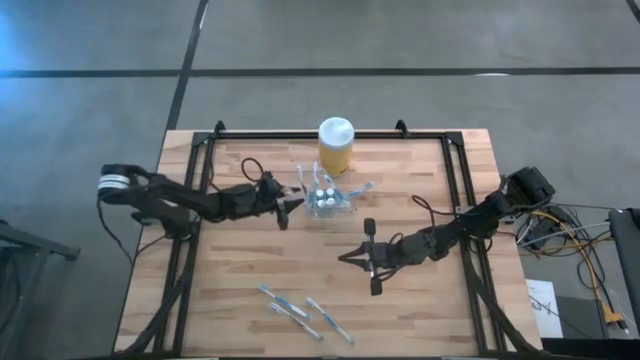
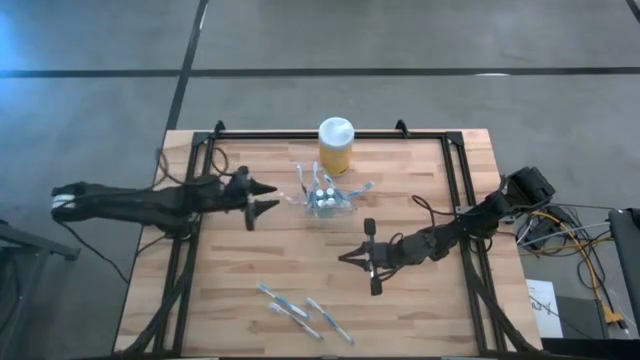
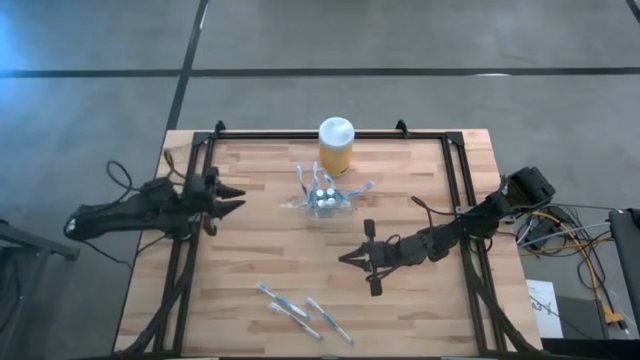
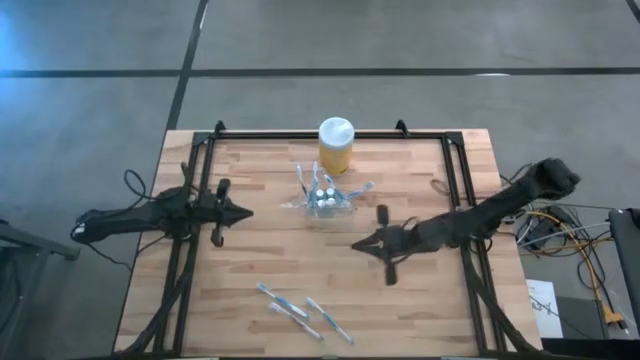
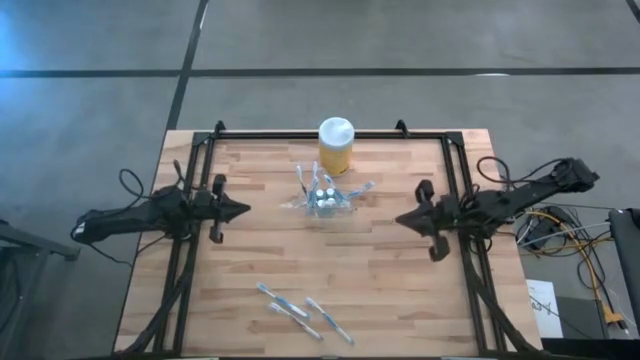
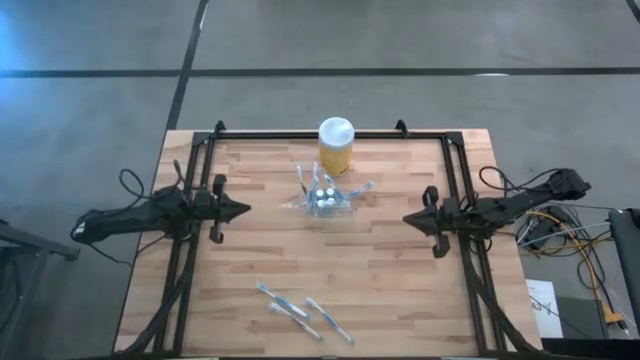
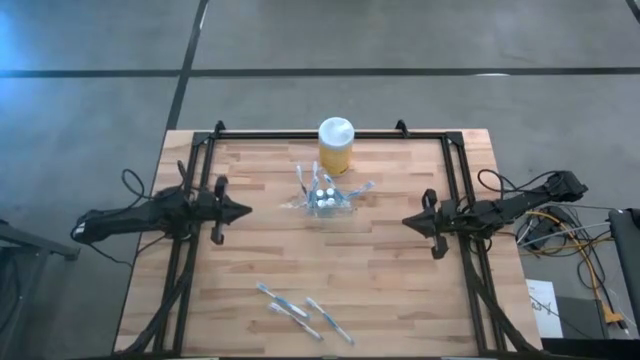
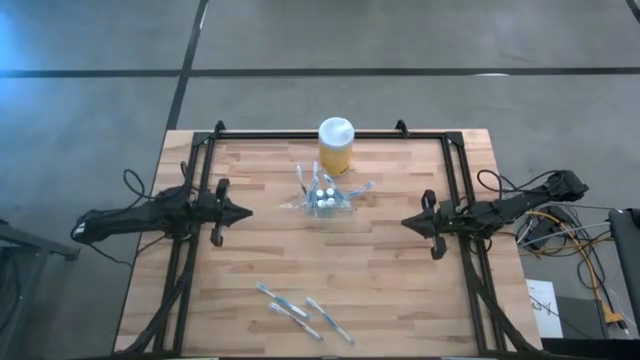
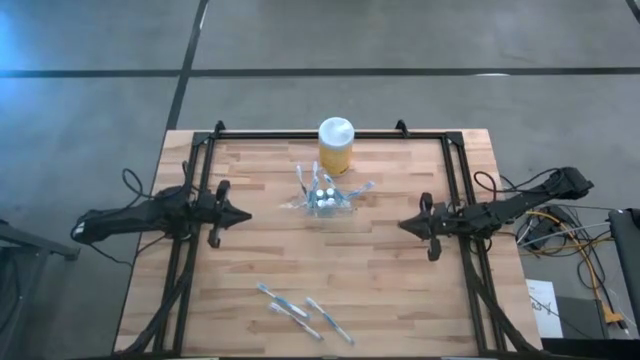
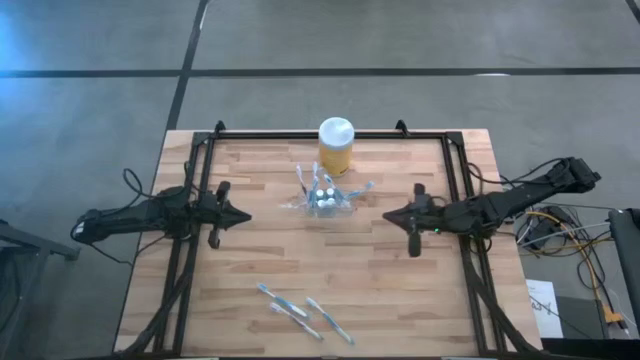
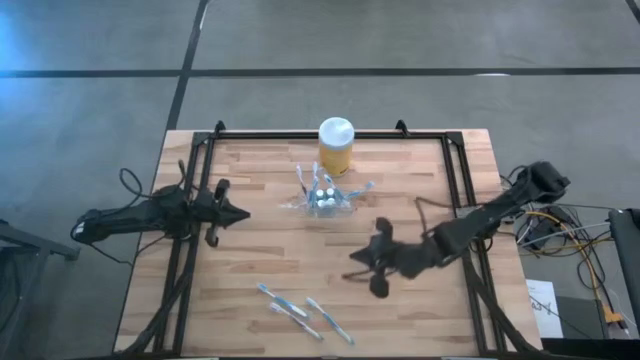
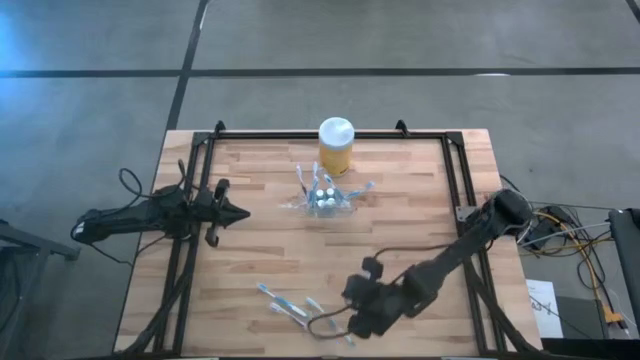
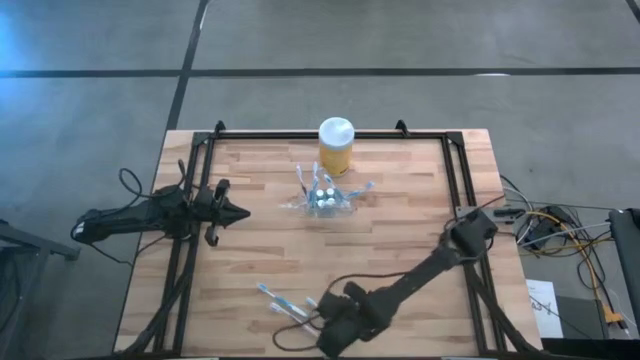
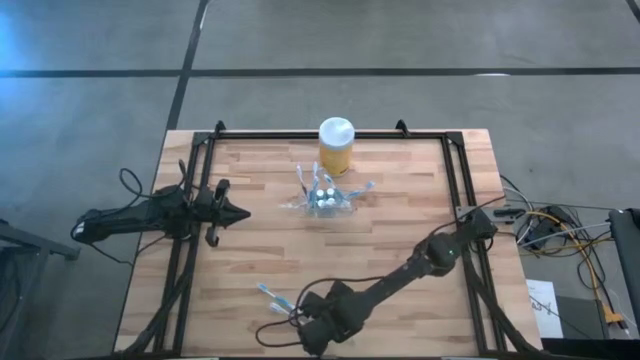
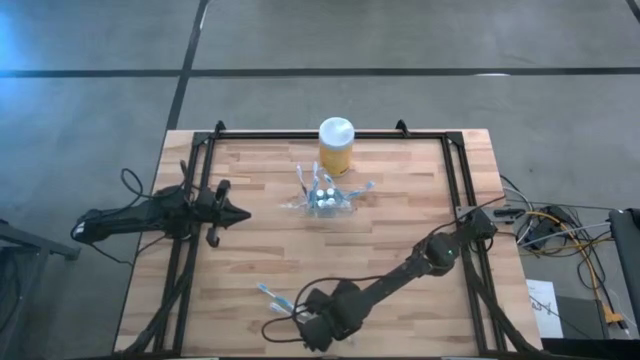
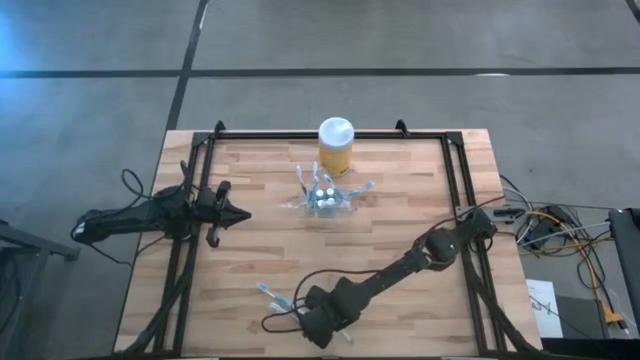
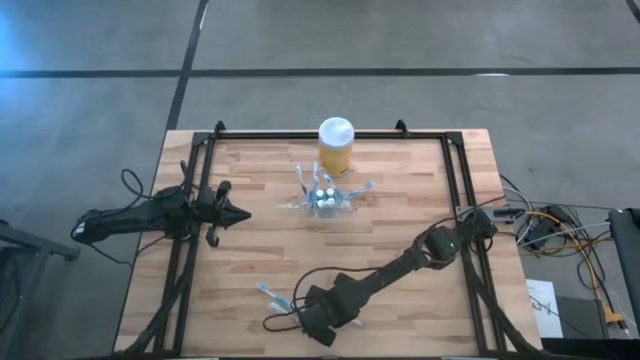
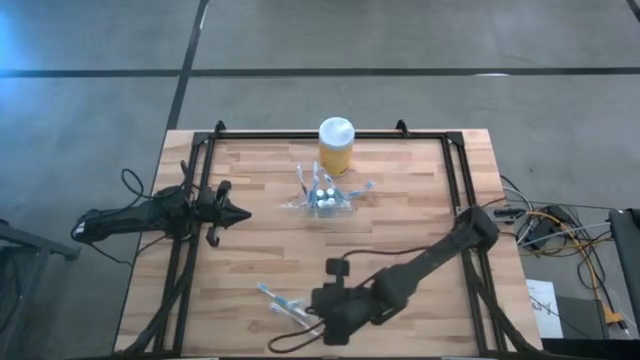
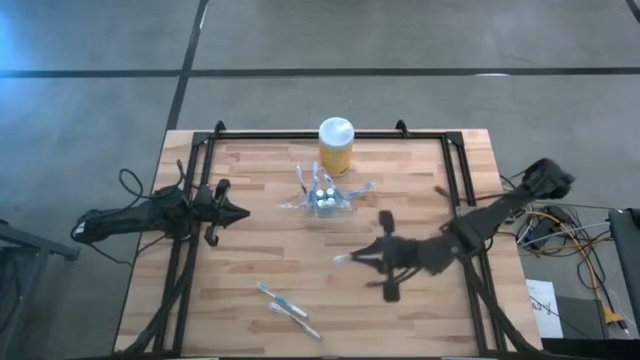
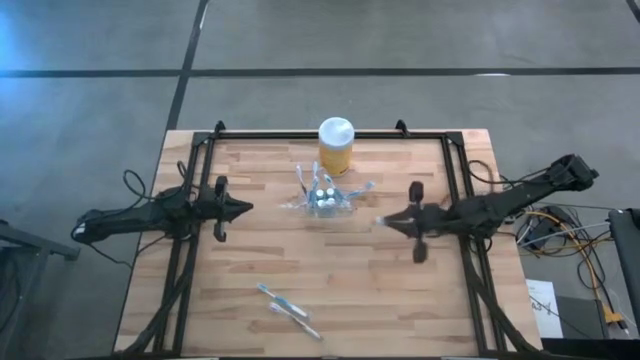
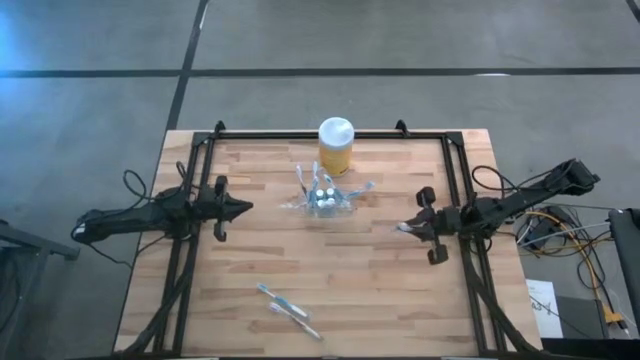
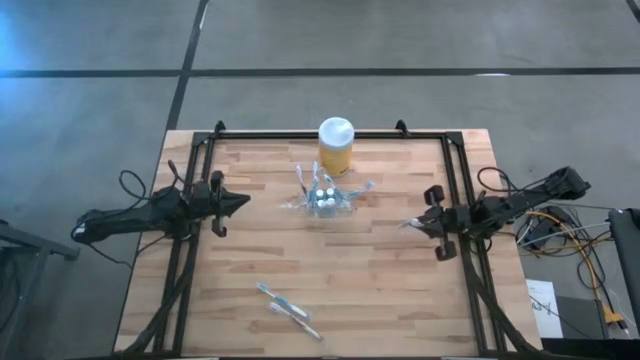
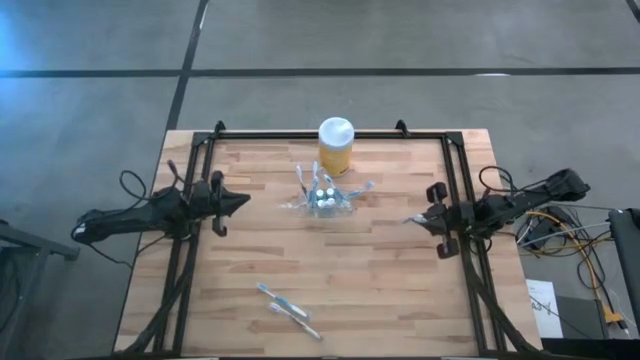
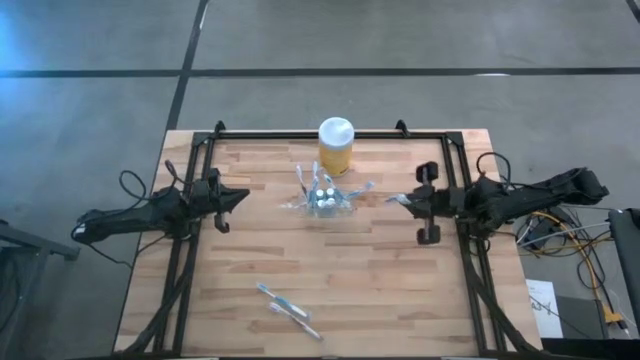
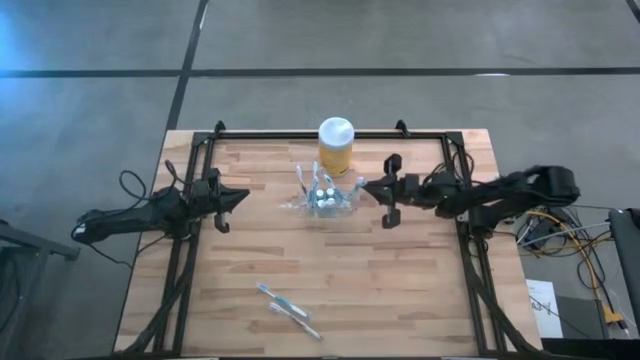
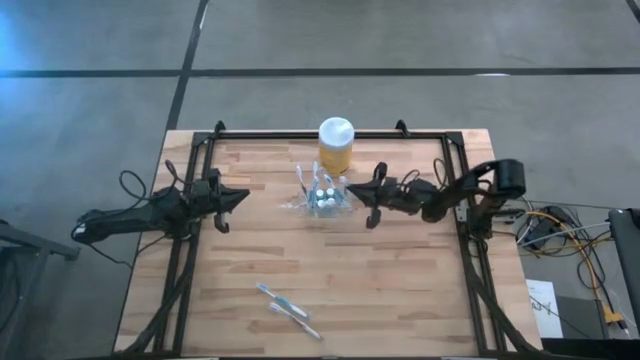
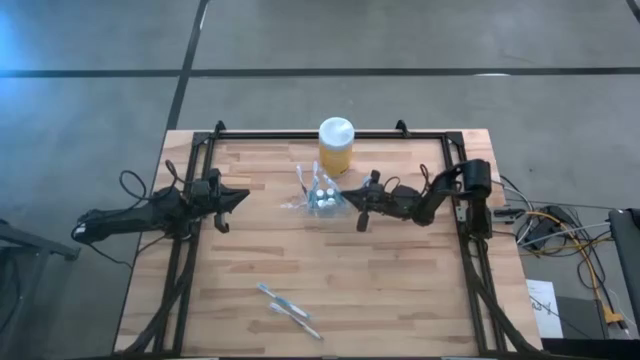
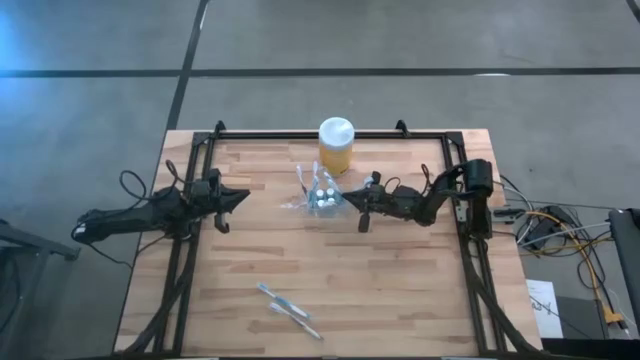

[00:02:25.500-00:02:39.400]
Task: Pick & Place toothbrushing station
Put the blue toothbrush into the transparent organizer

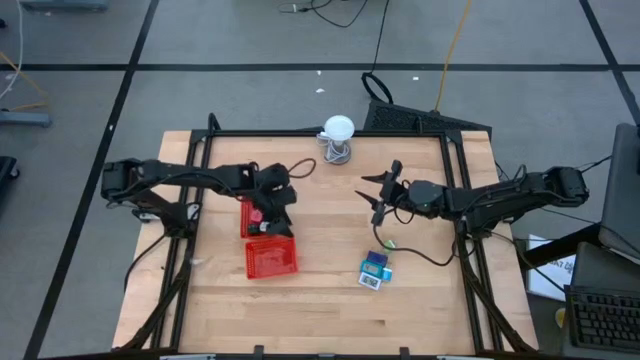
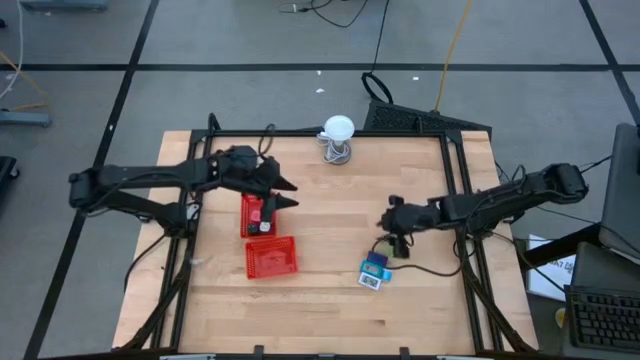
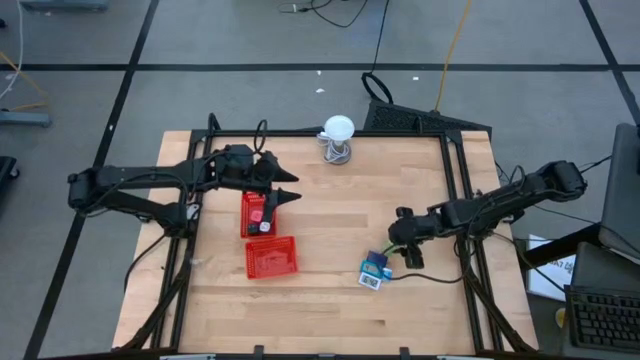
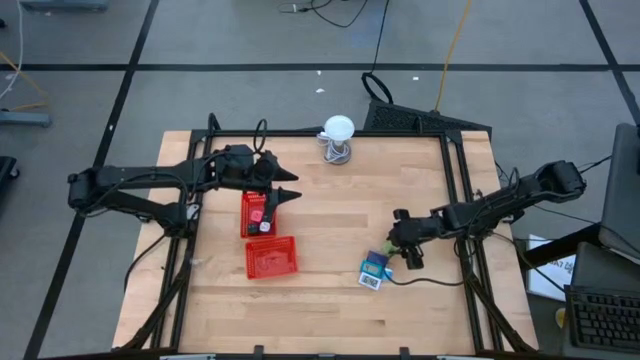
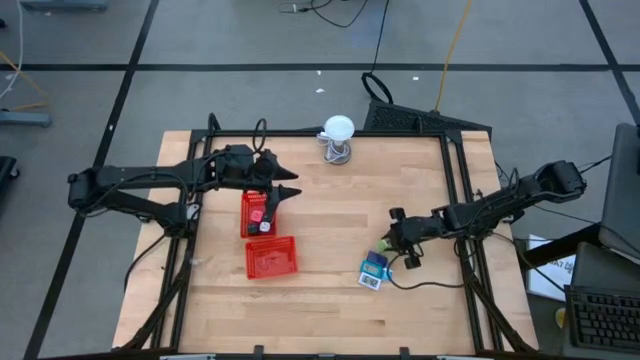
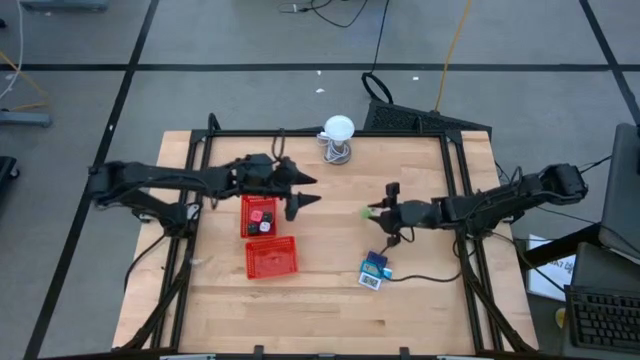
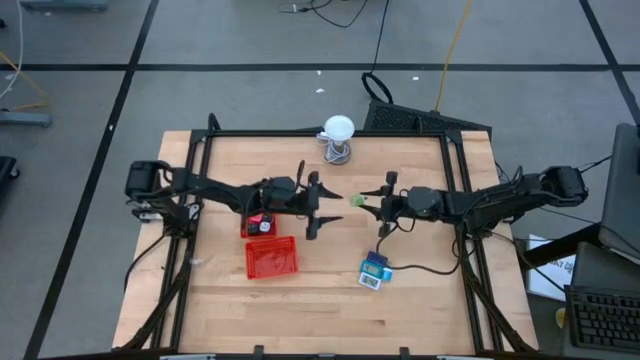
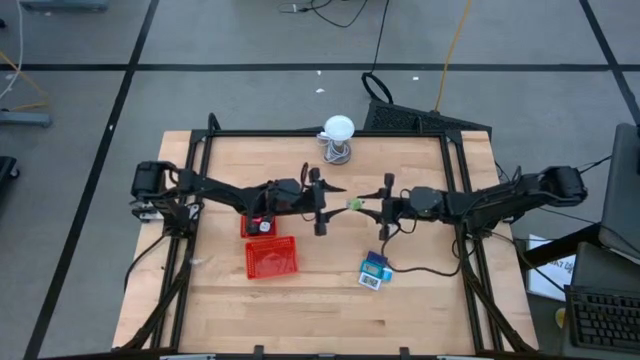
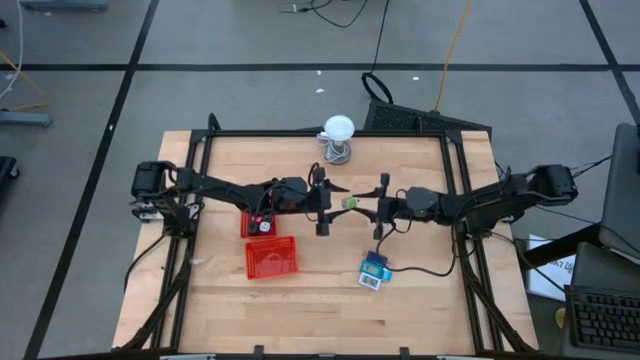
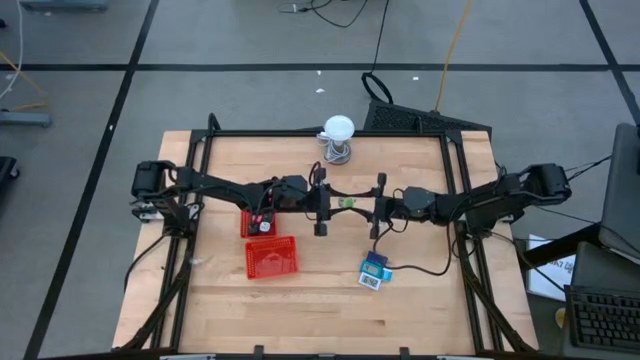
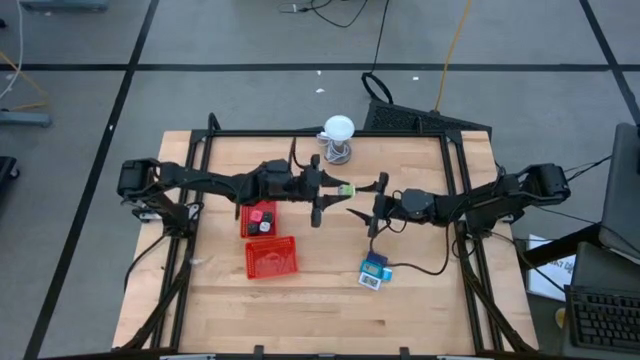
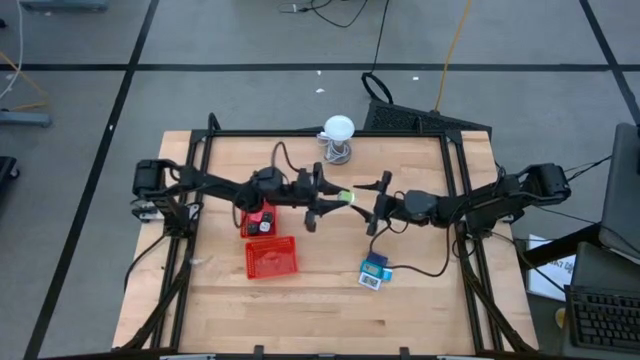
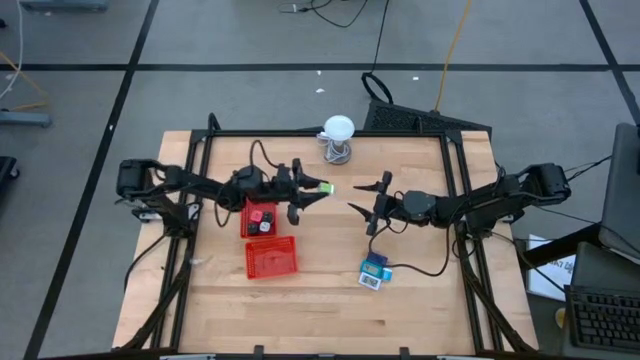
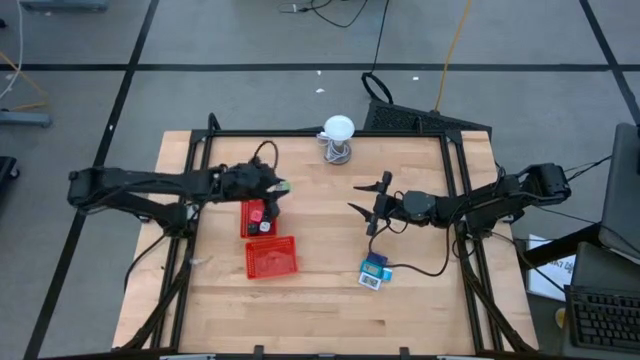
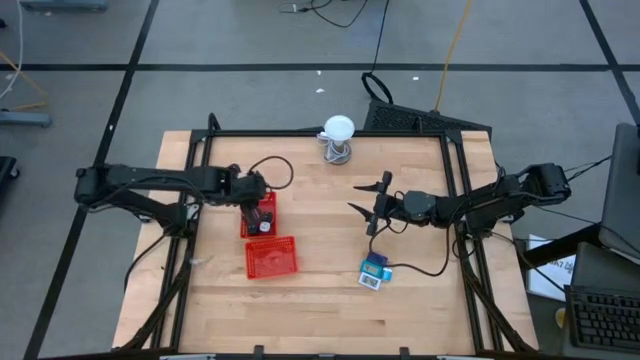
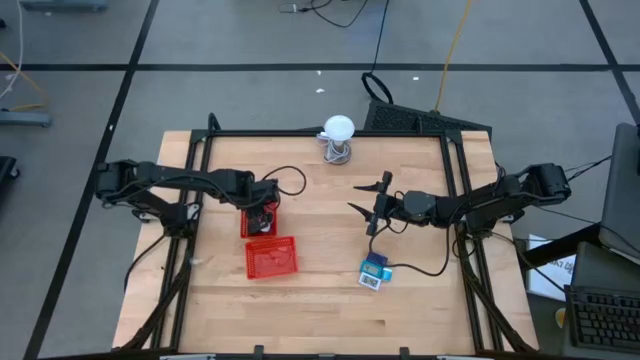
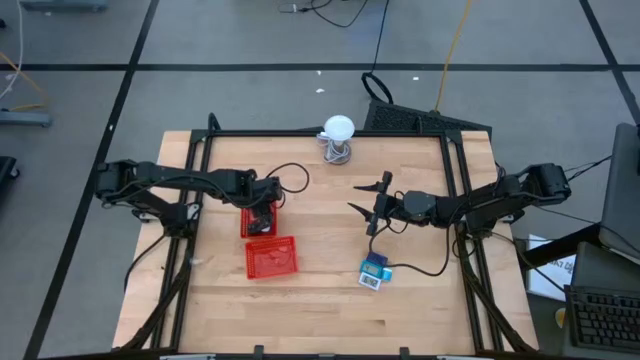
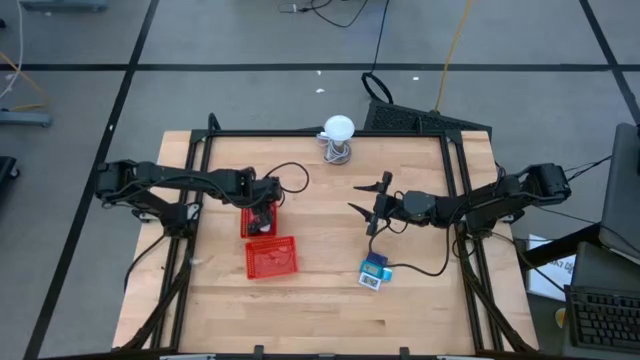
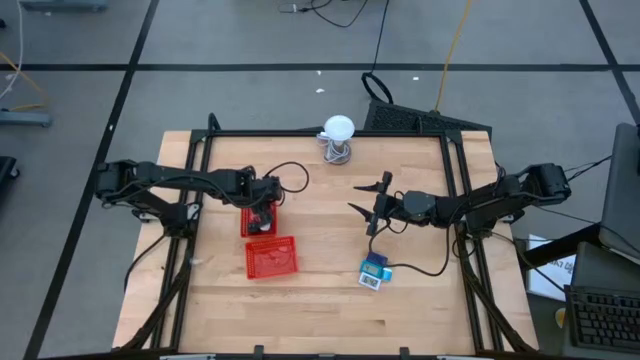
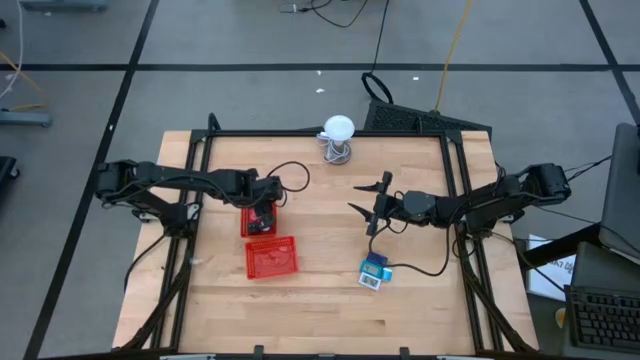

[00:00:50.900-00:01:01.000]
Task: Pick & Place Office items
Put the green charger adapter into the top red basket
